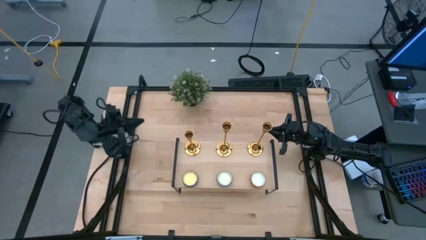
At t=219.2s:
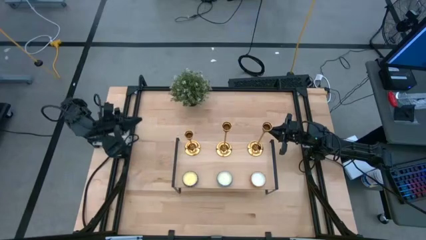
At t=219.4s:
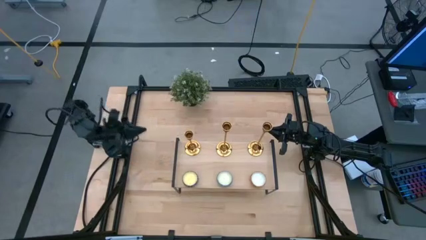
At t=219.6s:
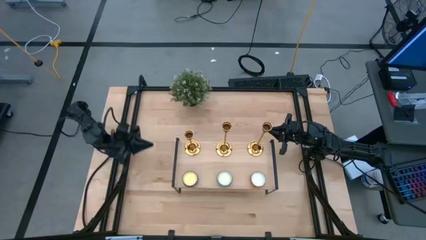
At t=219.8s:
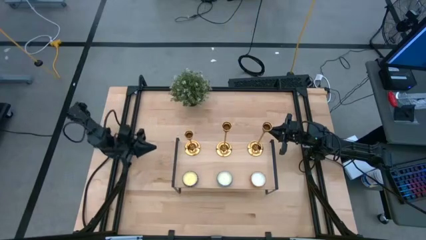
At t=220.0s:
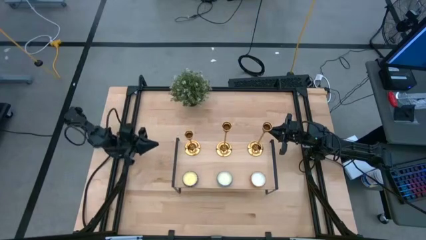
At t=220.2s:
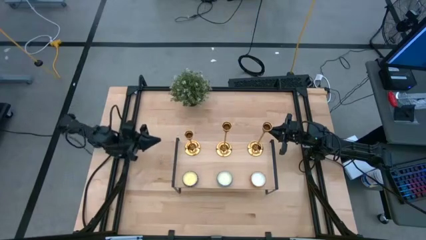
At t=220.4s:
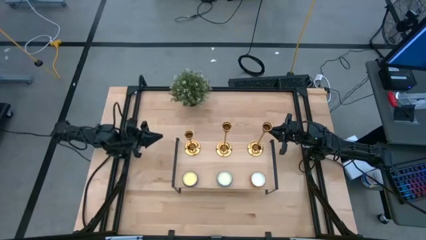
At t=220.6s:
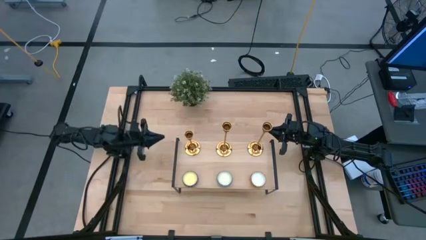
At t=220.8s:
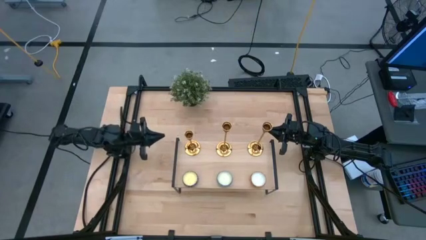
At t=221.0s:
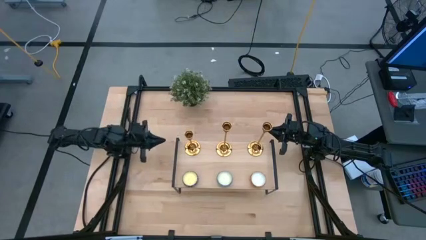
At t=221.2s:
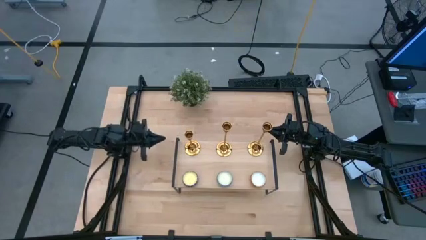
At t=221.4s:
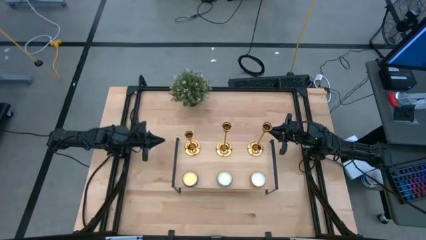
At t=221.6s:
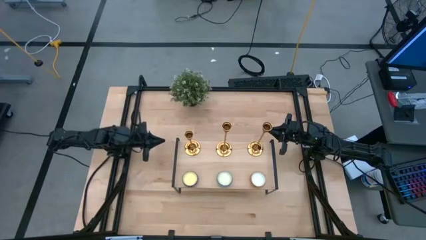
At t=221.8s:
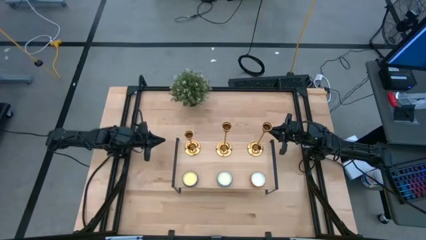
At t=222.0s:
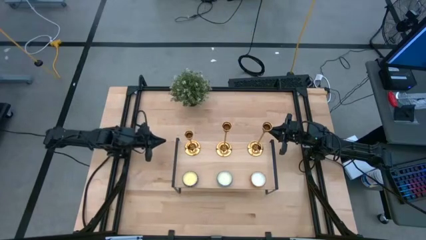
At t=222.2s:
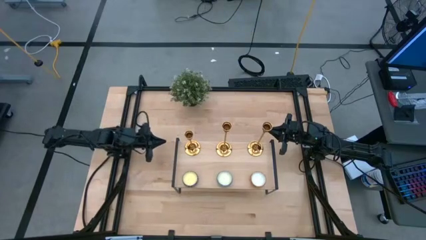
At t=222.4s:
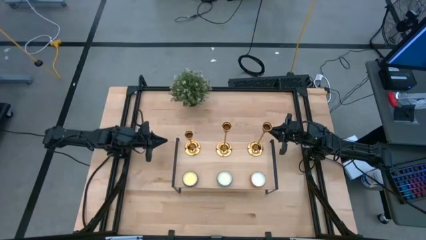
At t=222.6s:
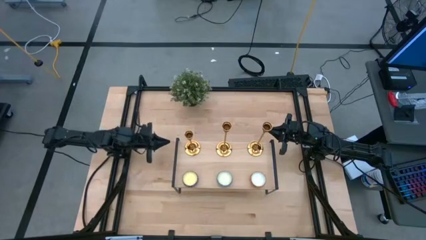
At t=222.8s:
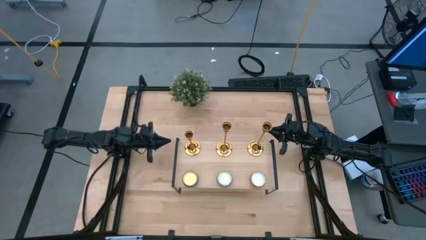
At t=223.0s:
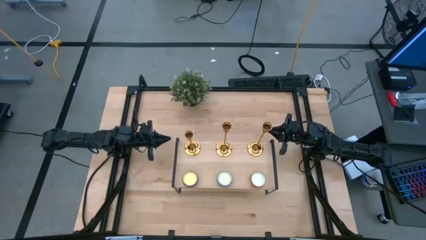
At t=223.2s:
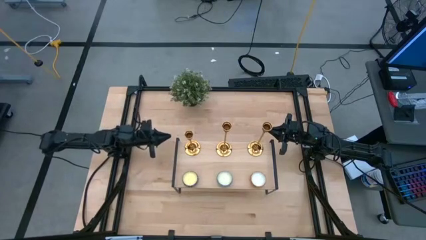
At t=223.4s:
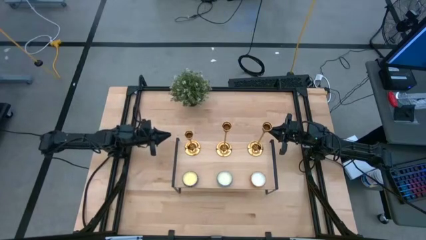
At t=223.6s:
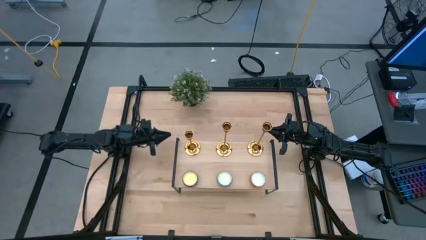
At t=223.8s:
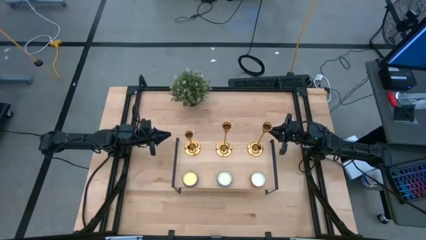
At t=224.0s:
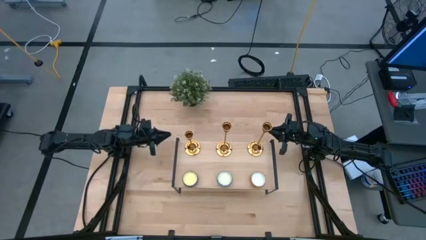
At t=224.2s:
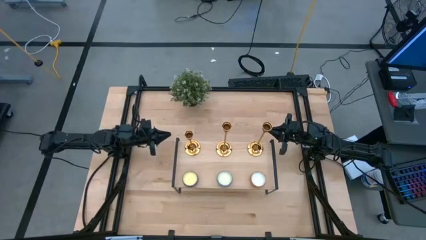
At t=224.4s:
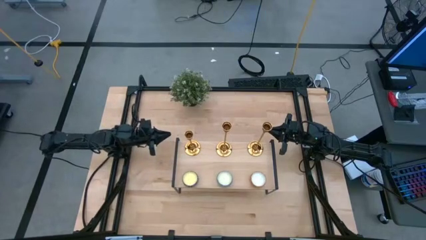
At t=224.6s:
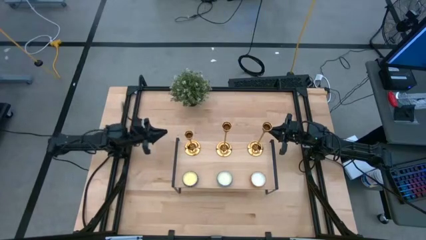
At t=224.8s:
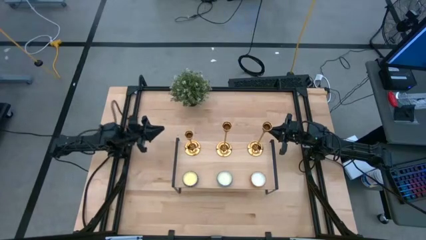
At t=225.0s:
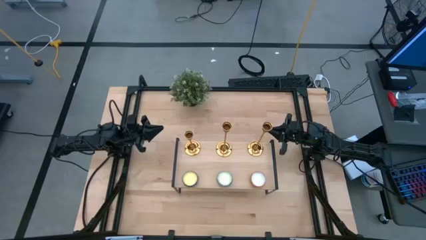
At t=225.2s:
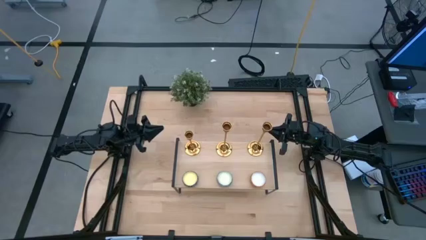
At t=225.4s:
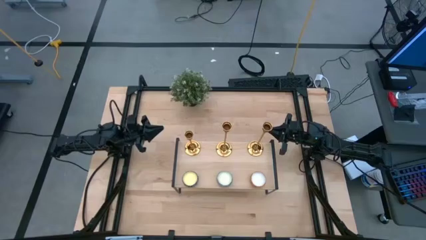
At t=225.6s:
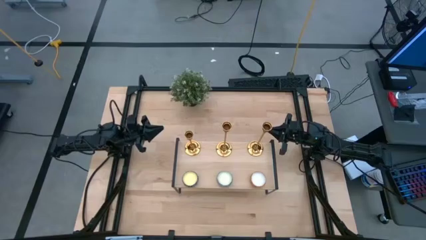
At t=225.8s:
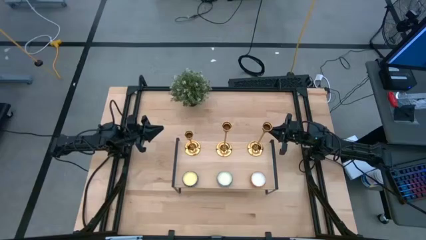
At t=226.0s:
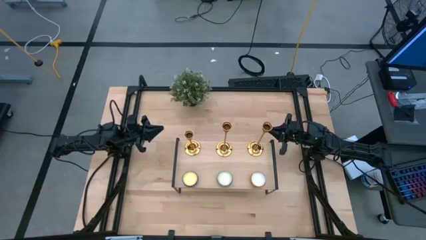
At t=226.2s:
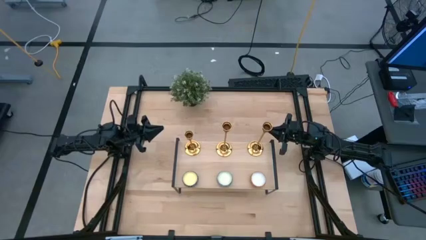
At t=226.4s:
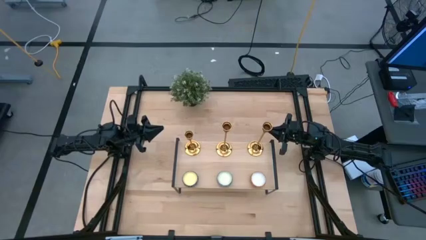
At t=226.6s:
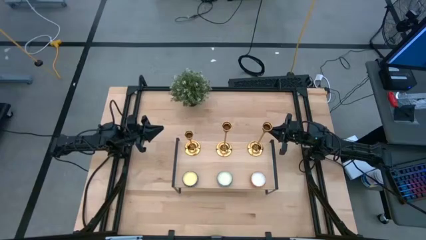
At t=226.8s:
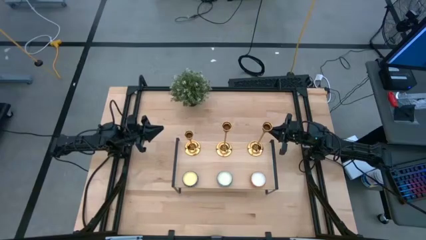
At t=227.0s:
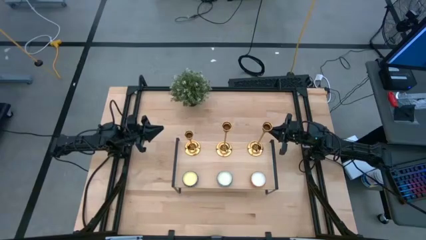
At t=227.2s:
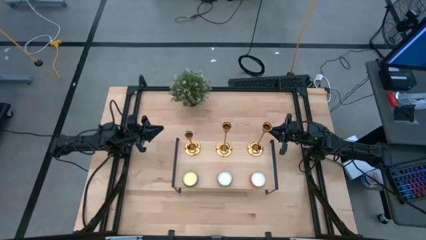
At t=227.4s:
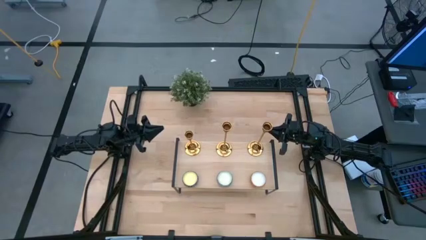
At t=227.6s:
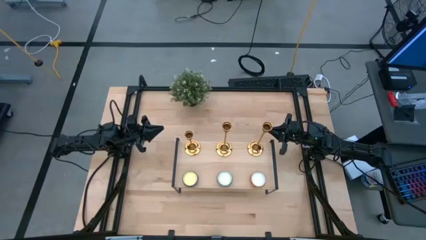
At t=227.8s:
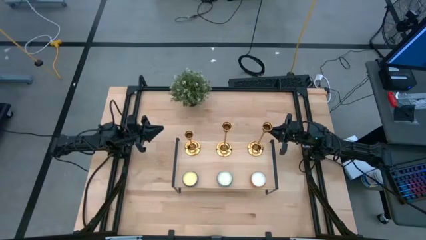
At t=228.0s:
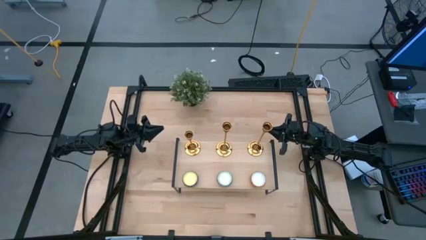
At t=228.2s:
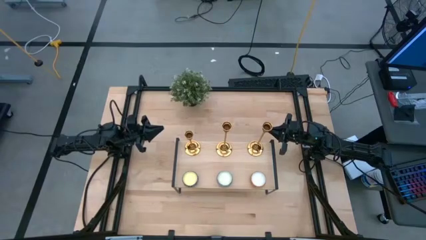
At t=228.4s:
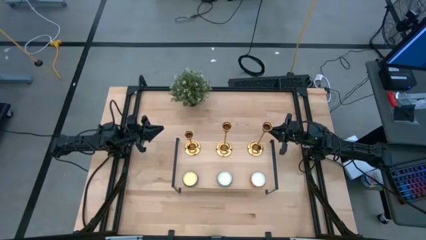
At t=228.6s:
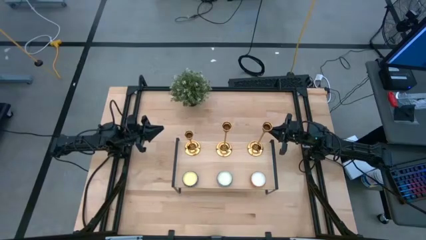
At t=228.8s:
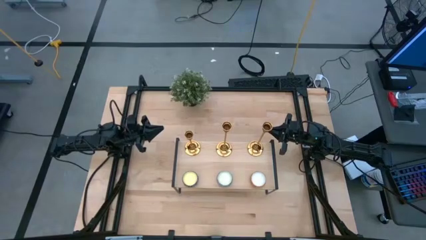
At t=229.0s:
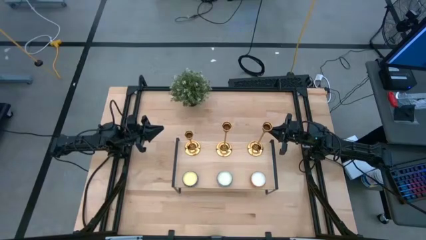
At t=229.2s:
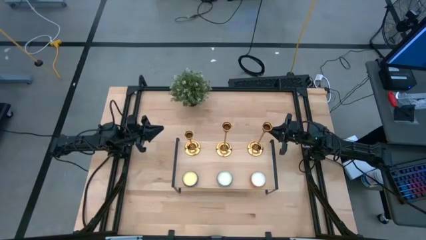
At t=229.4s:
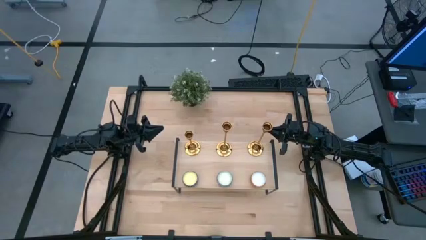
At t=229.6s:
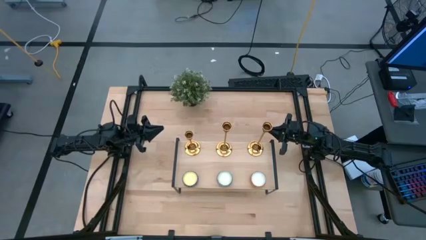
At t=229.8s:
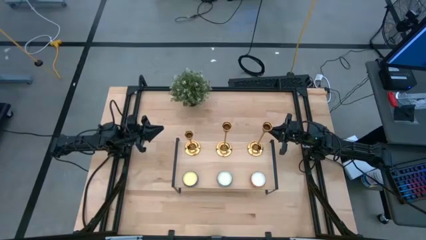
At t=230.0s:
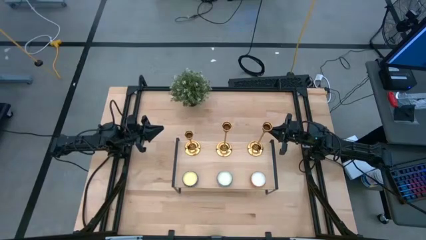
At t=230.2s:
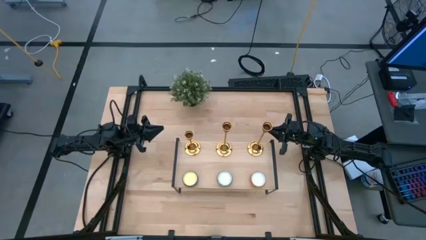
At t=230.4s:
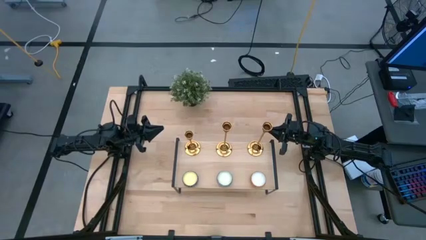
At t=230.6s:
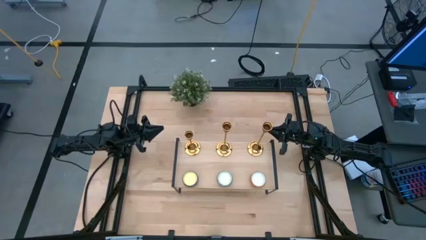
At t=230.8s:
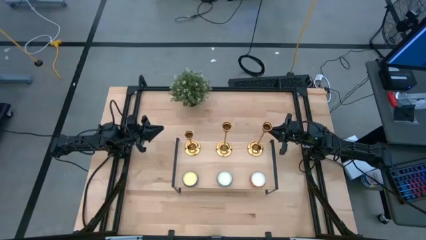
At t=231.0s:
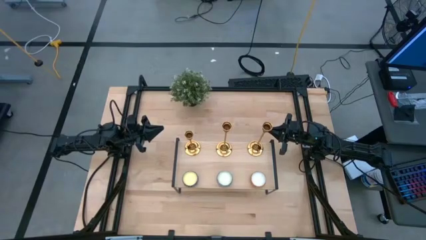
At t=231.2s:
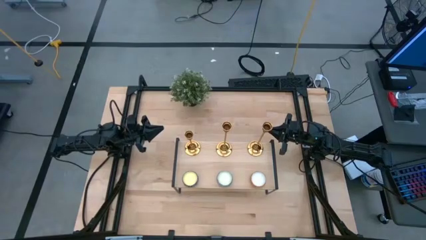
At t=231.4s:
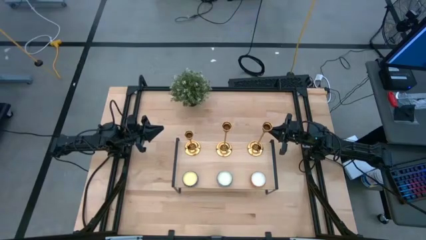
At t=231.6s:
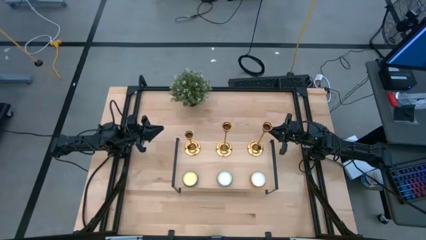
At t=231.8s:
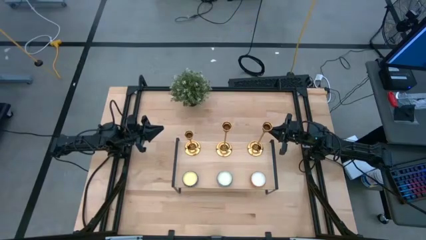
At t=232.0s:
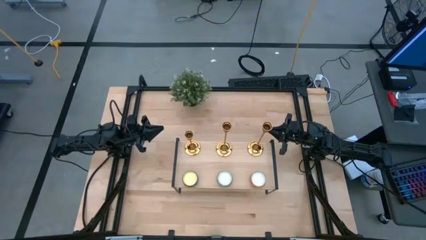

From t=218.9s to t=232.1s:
Task: Pick & Place candle stick holders
Return to Home Position

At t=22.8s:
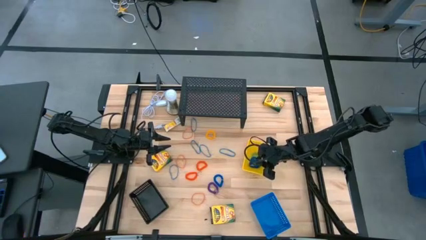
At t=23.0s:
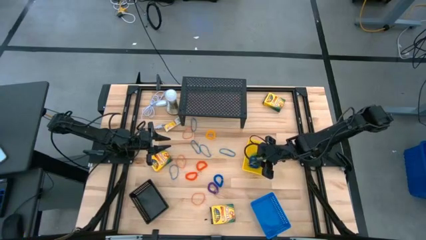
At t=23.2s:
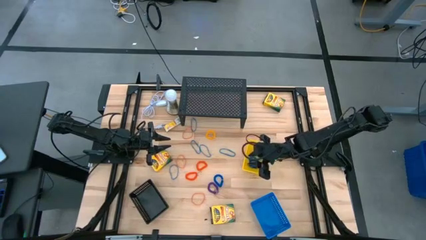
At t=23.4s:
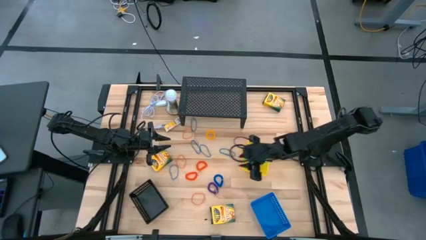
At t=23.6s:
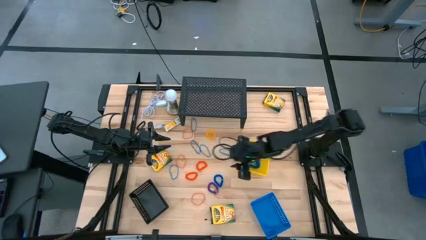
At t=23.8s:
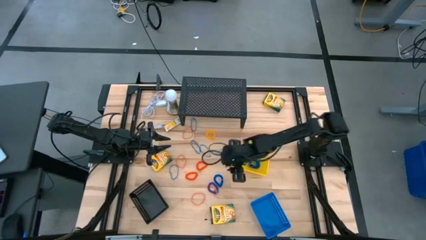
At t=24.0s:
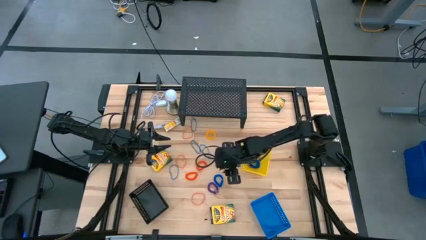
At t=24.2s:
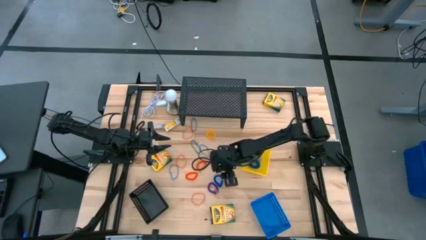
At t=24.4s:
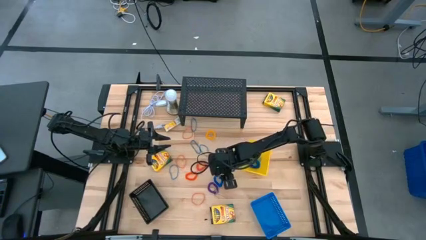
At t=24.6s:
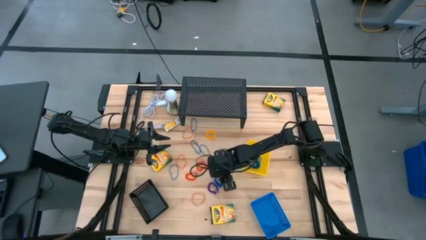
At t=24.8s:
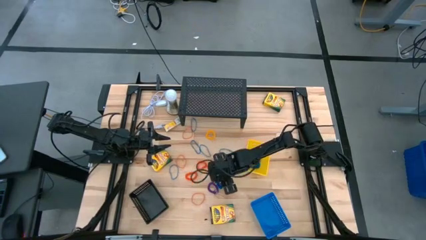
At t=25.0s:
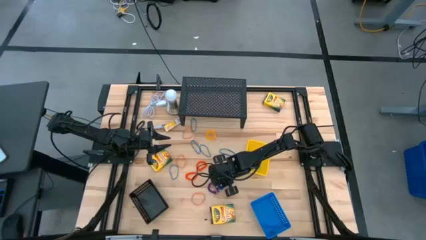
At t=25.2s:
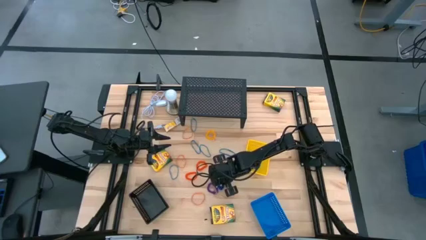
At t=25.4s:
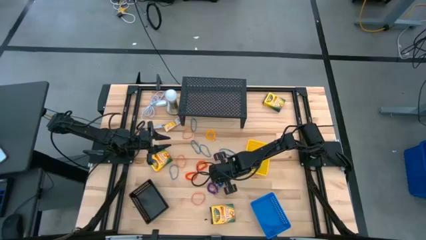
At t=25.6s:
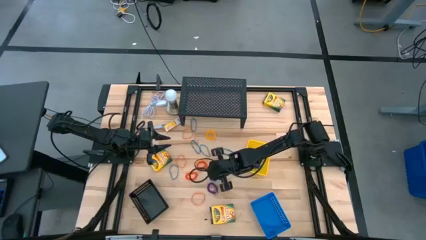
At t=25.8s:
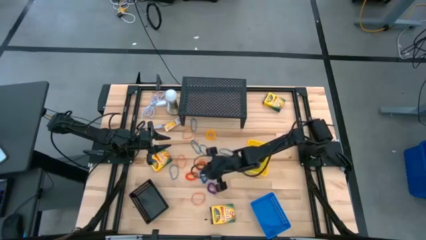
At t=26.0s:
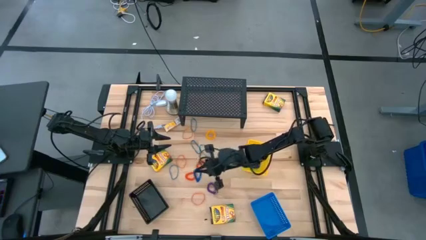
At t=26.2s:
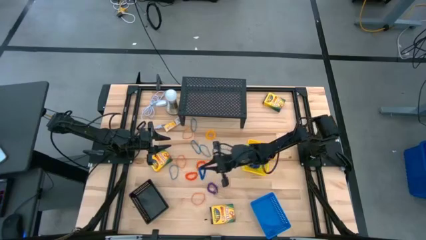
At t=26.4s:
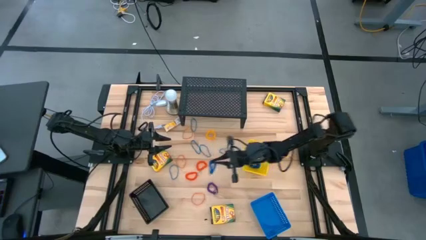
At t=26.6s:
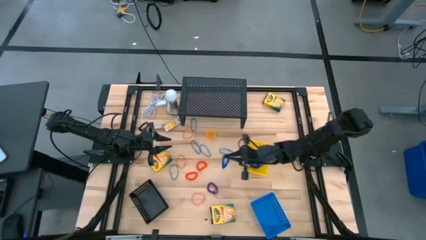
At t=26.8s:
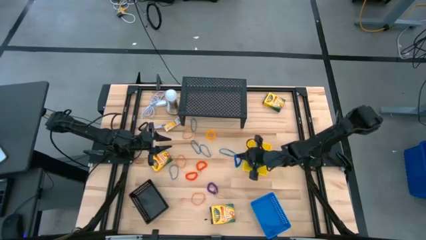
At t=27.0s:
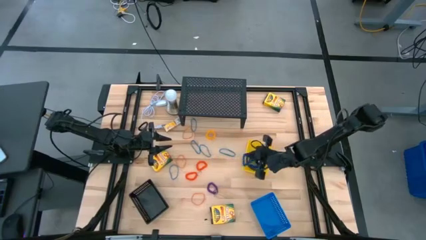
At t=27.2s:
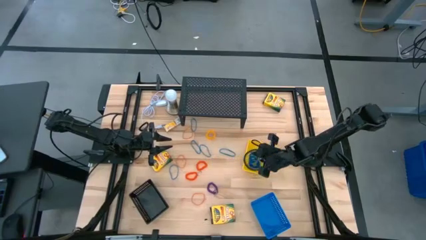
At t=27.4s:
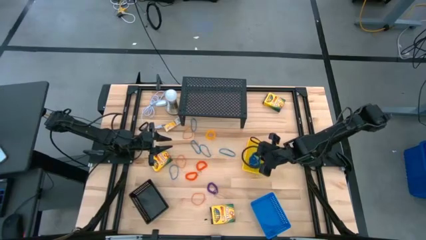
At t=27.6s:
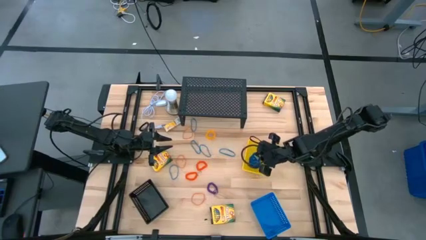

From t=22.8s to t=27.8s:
Task: Pick & Place Office Desk Supplies
Put the blue spring keychain into the yellow basket
